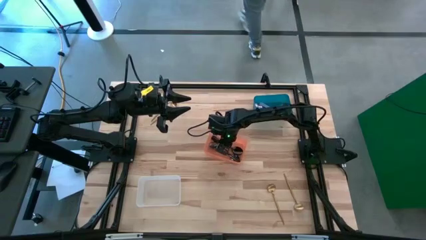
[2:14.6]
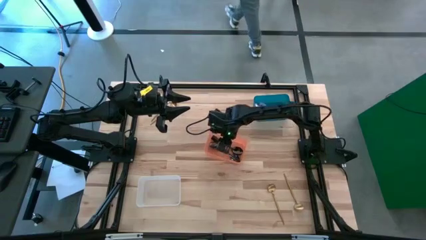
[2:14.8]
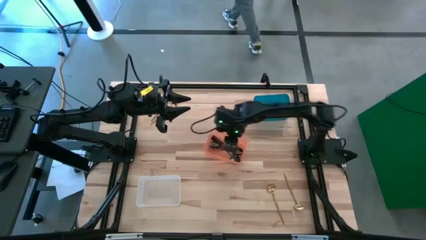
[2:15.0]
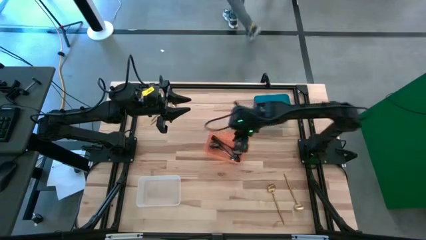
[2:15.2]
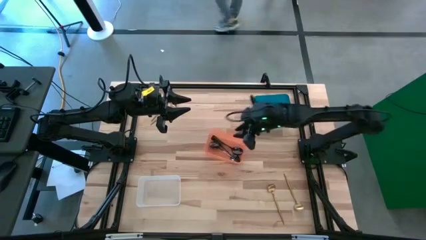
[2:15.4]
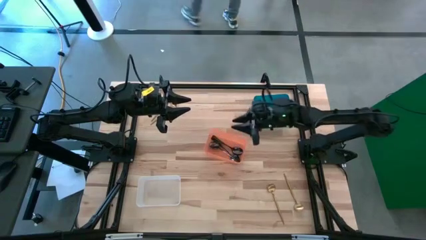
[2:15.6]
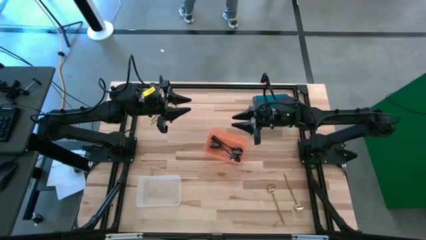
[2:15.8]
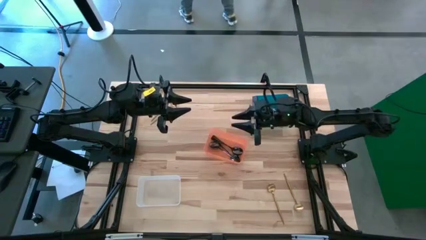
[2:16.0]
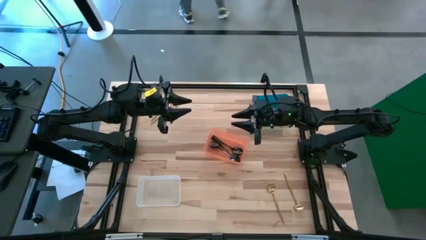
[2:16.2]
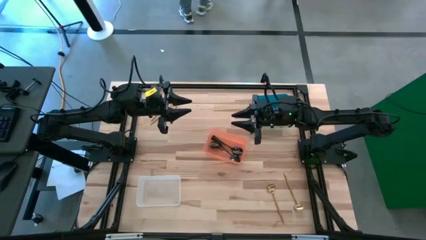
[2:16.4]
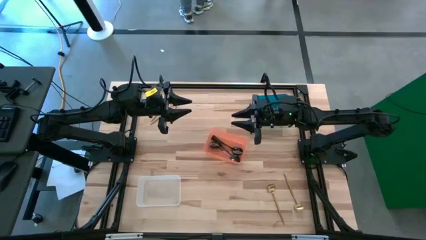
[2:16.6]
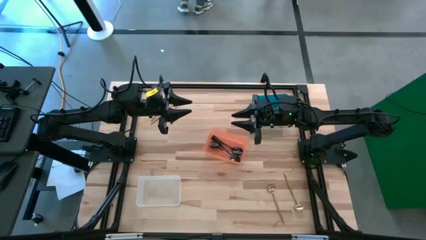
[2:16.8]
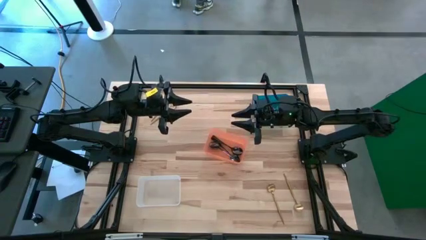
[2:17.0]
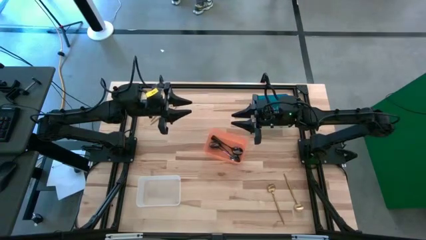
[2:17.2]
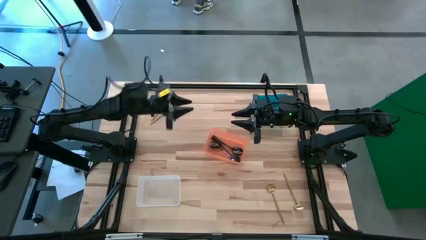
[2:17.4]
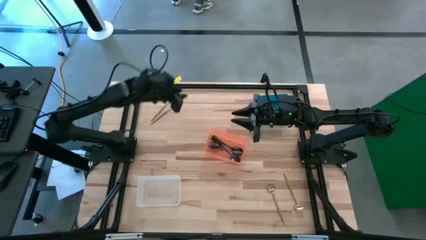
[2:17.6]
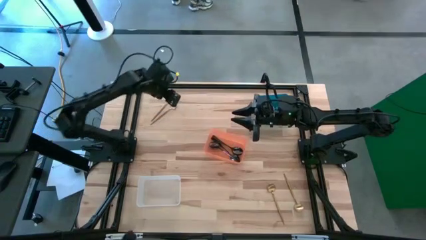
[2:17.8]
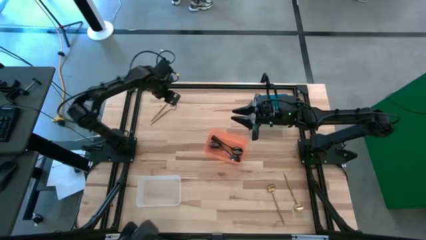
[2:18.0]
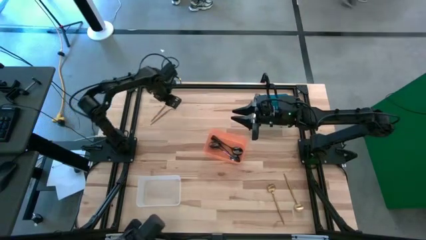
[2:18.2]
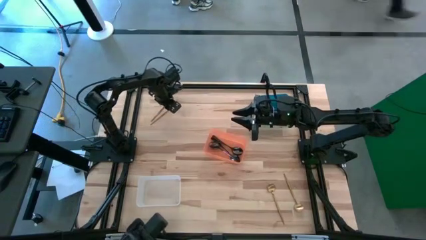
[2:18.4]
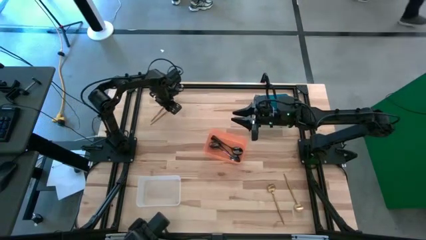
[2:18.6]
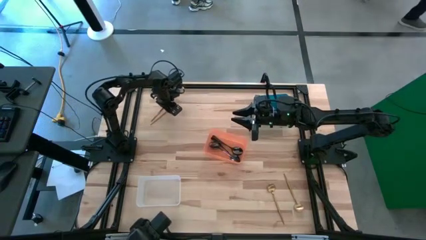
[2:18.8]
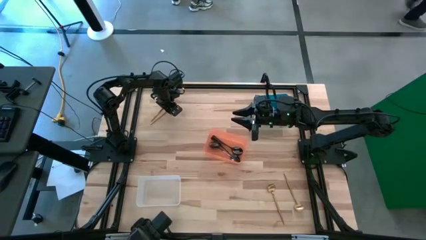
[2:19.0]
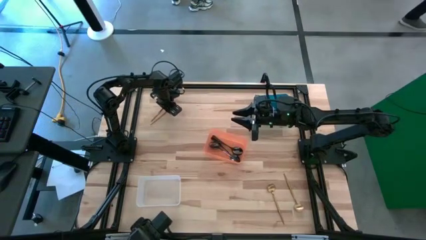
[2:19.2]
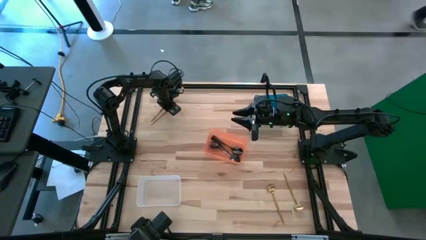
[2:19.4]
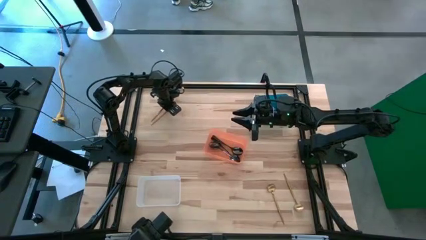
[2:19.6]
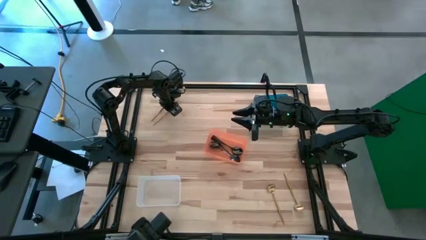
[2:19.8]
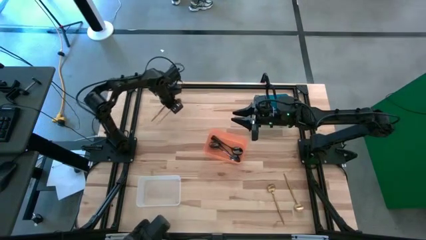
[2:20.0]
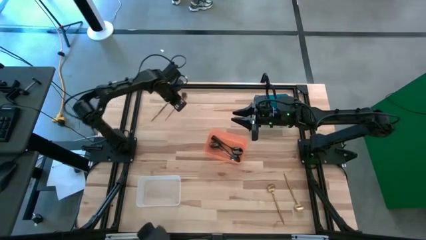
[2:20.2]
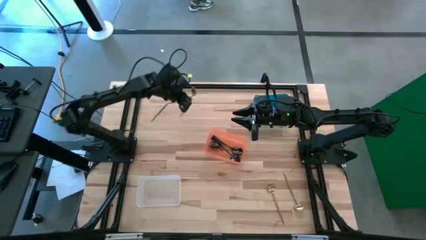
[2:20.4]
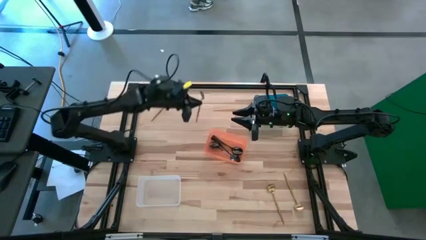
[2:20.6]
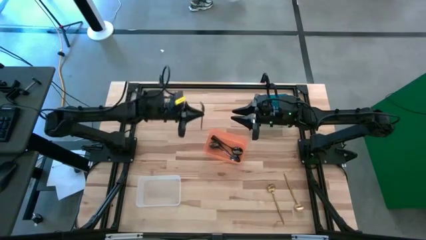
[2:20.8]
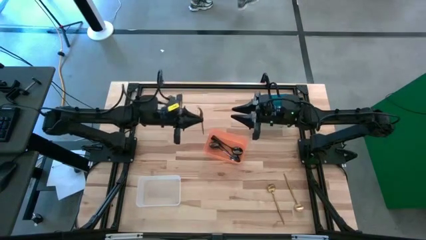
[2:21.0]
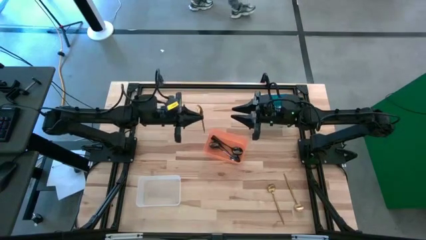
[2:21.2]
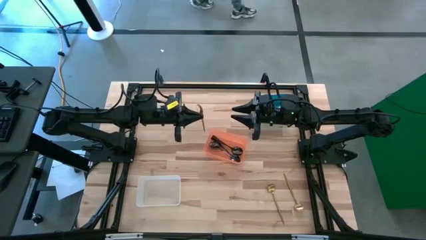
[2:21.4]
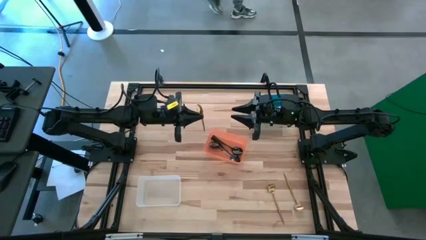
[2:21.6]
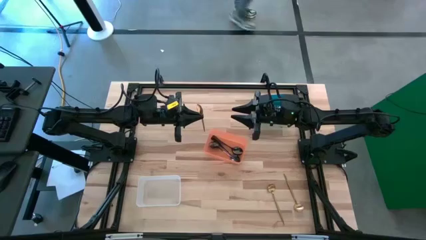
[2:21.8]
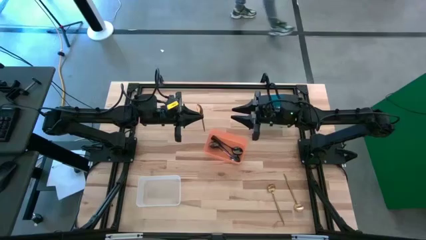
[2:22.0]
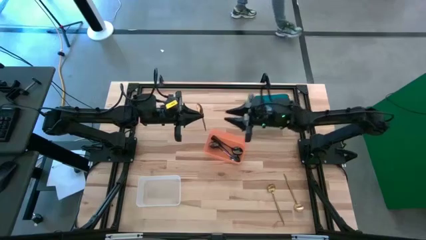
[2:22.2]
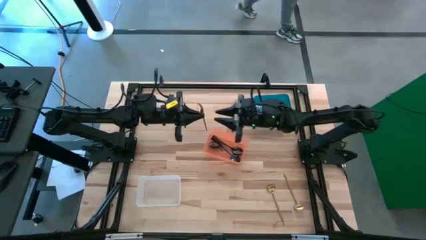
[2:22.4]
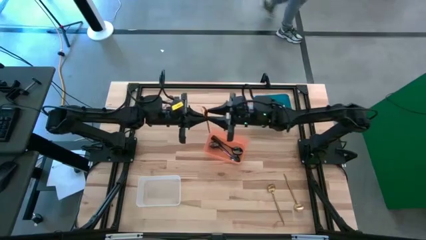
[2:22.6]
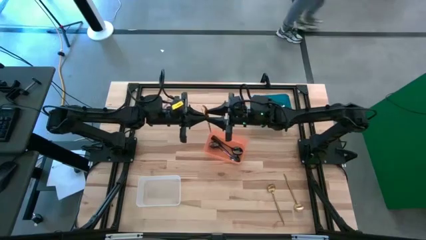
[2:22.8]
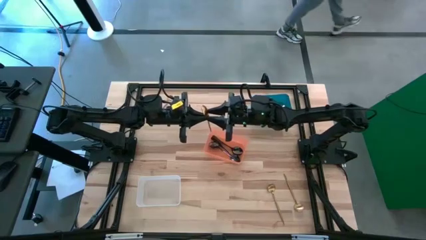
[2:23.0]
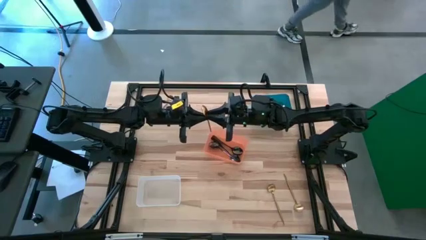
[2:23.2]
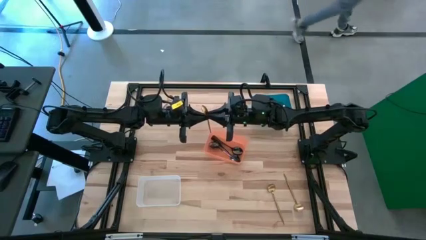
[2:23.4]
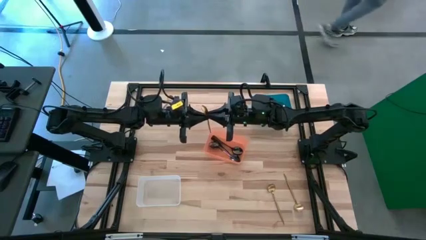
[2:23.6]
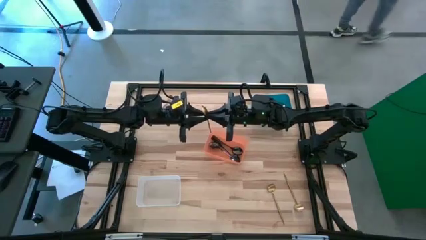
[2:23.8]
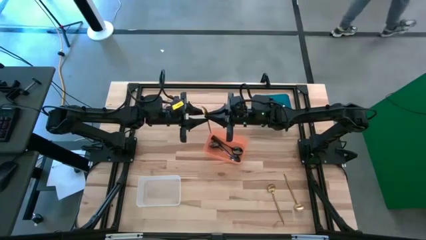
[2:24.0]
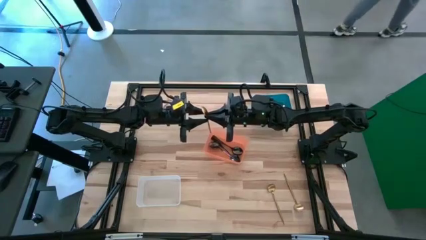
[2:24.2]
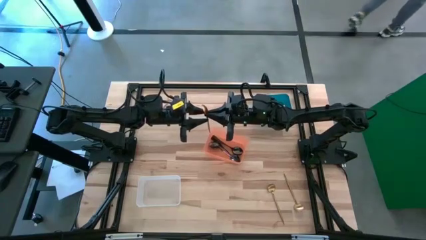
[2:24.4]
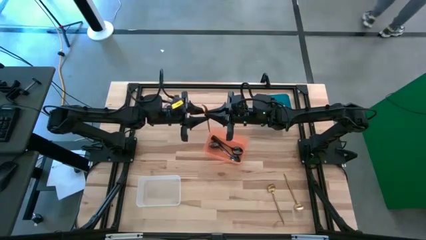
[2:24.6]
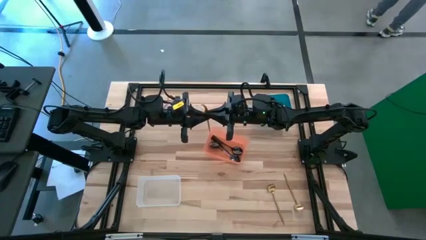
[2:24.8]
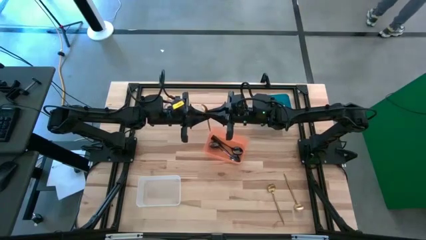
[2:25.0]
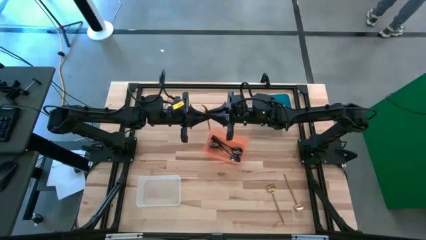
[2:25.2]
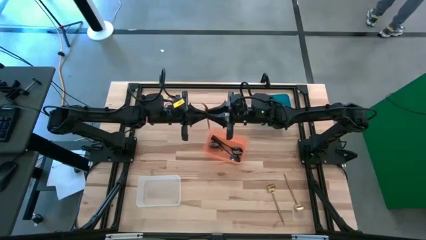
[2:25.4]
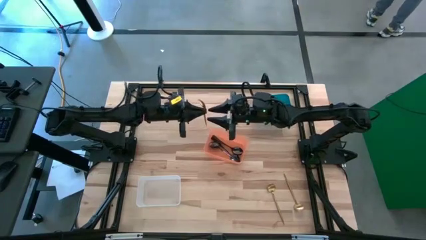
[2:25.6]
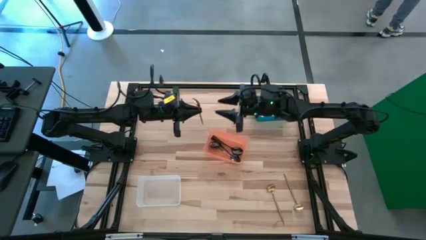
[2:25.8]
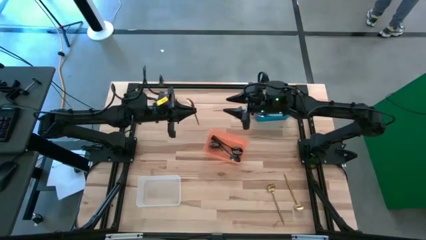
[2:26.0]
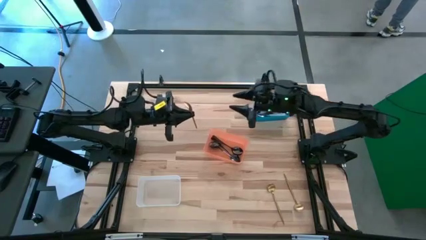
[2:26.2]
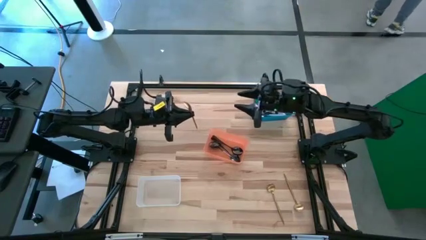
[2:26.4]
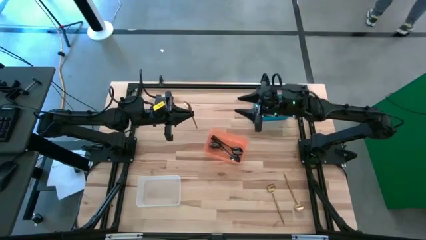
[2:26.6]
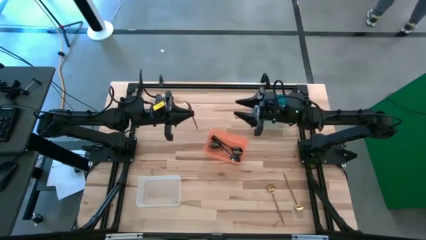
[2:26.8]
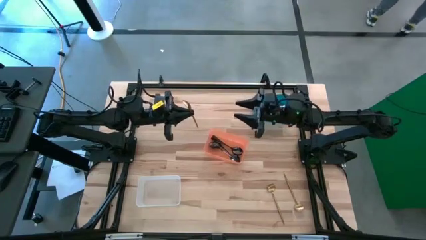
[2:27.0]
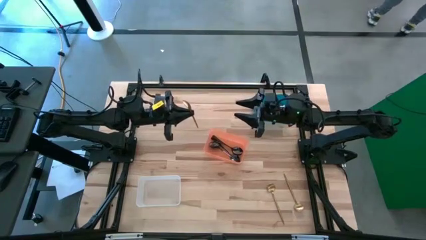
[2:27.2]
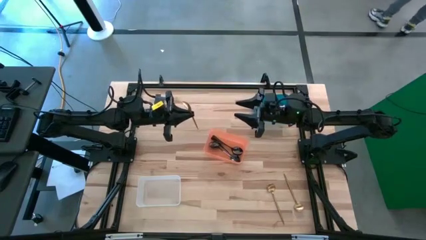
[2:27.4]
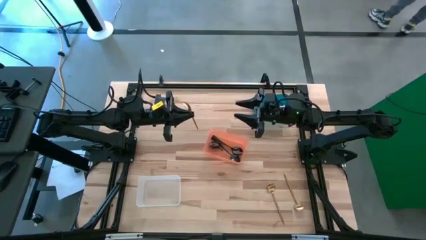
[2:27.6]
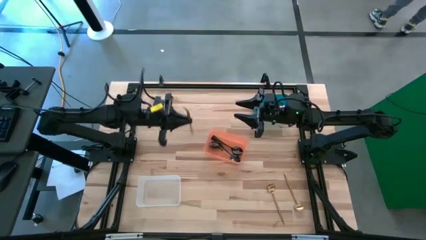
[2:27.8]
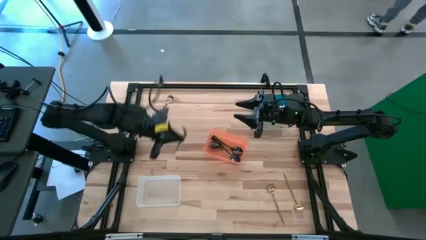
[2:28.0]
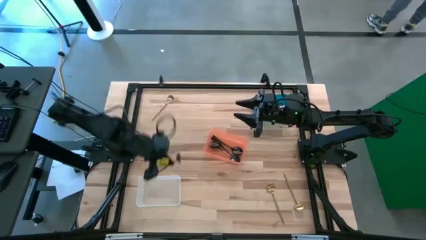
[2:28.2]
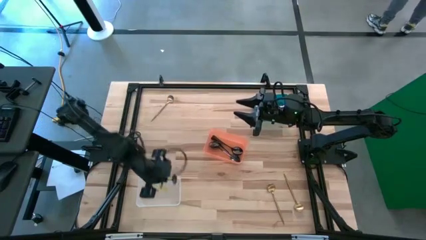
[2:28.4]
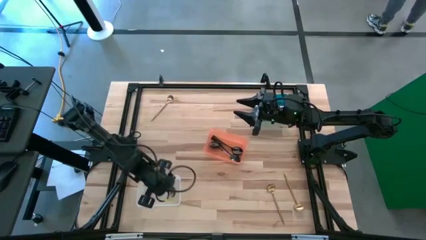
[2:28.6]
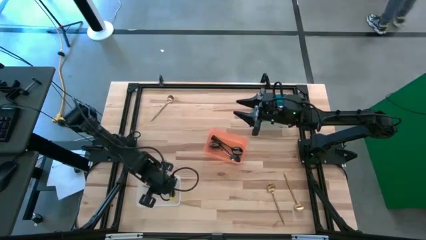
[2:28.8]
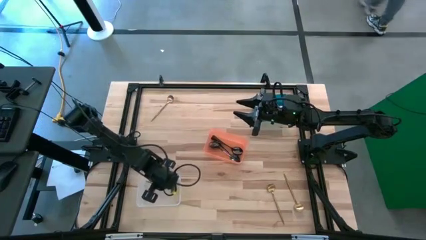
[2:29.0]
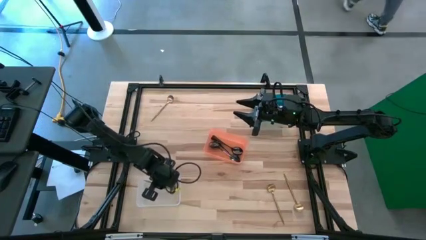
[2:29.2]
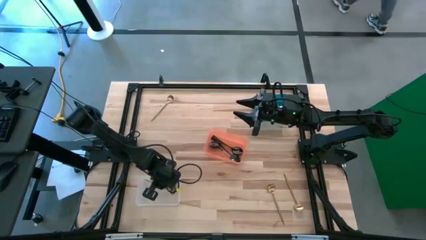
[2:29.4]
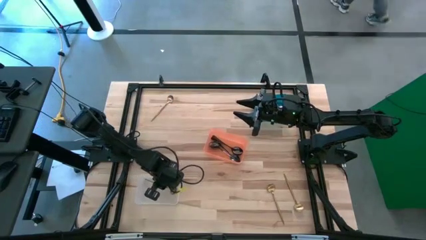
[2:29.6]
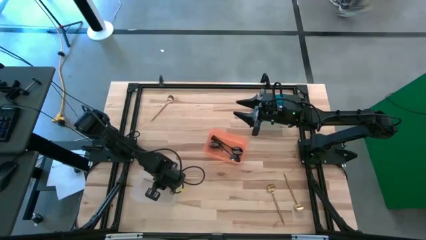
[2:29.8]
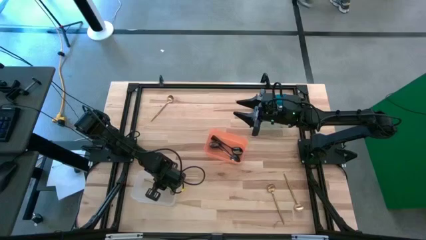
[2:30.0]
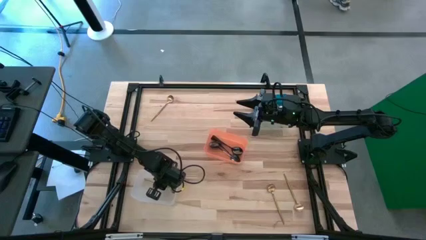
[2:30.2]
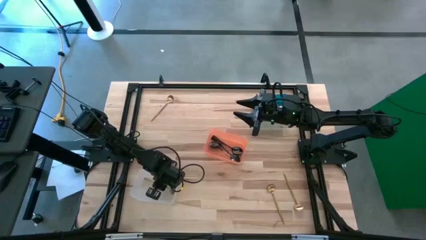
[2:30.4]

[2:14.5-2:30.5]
Task: Sort silverware by color (type)
Put the top right golden spoon into the white bin

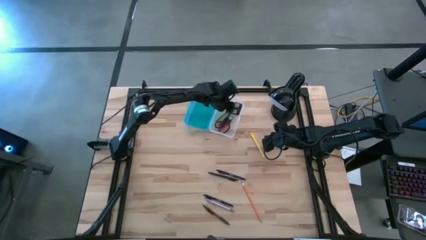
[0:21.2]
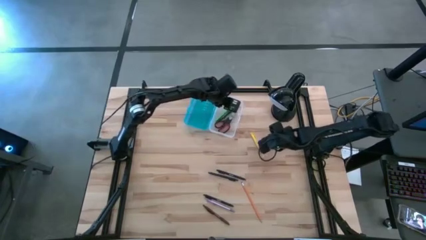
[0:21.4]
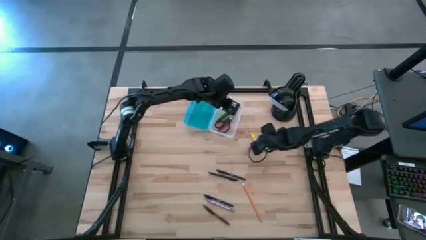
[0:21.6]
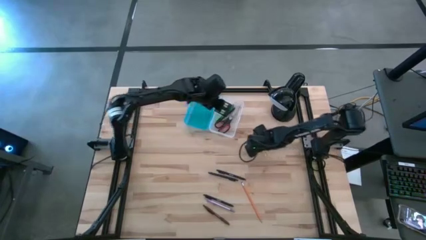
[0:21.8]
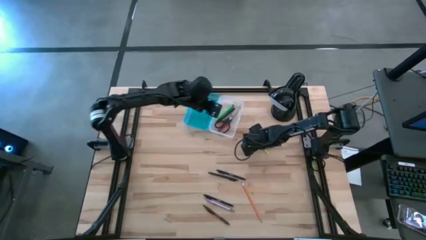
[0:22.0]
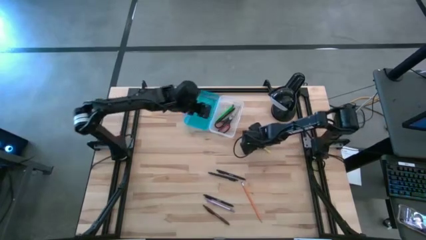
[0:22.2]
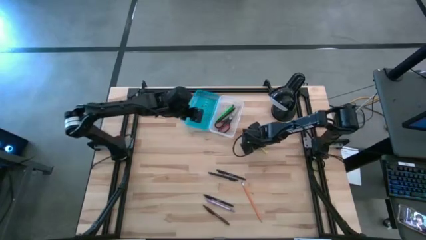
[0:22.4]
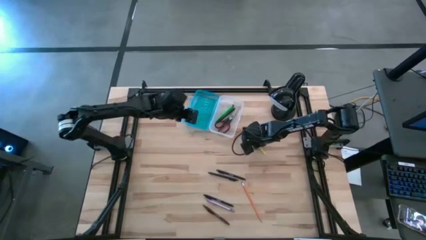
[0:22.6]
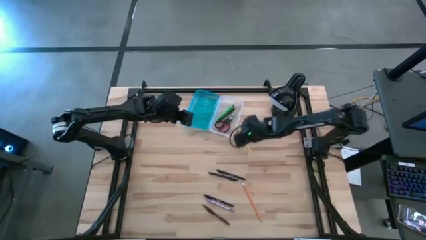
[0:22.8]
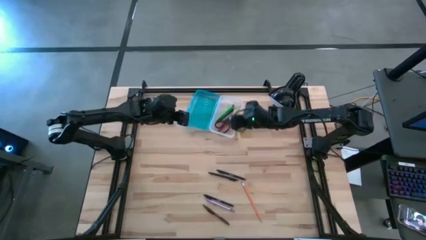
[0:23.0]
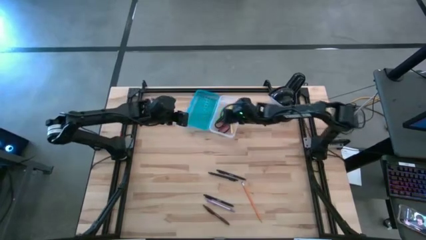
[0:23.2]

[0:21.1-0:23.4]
Task: Pick & place school supplies into a supply box
Put the yellow pen into the blue supply box
